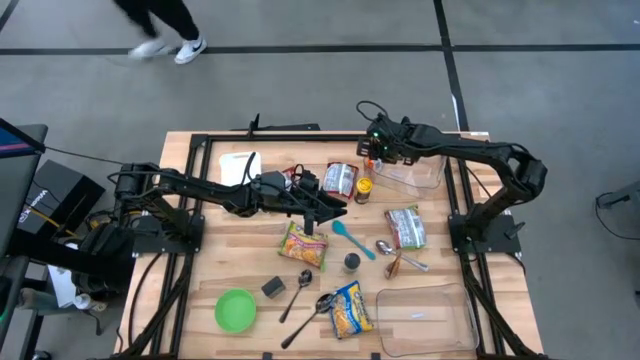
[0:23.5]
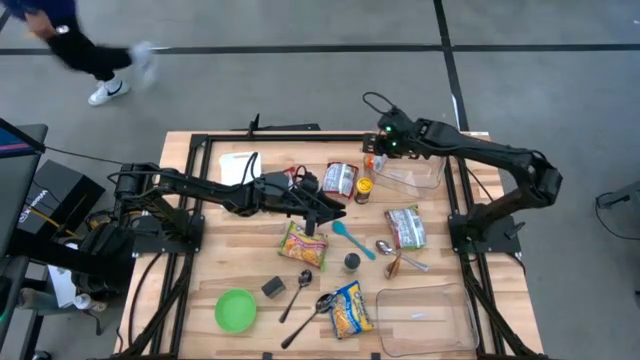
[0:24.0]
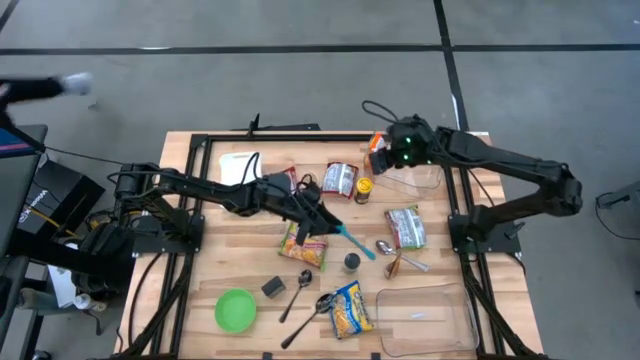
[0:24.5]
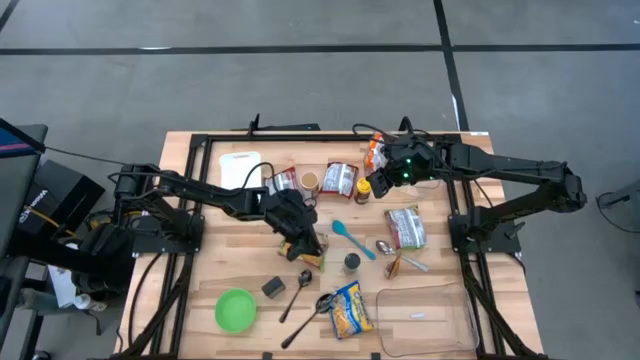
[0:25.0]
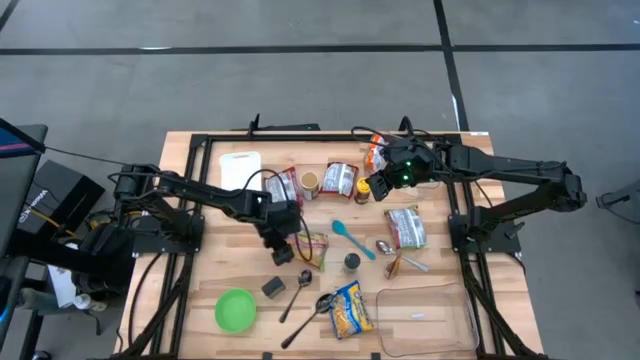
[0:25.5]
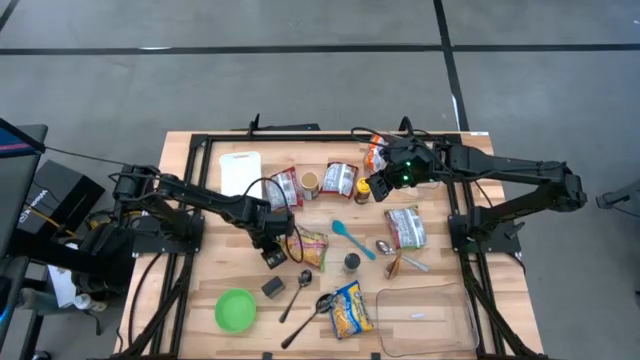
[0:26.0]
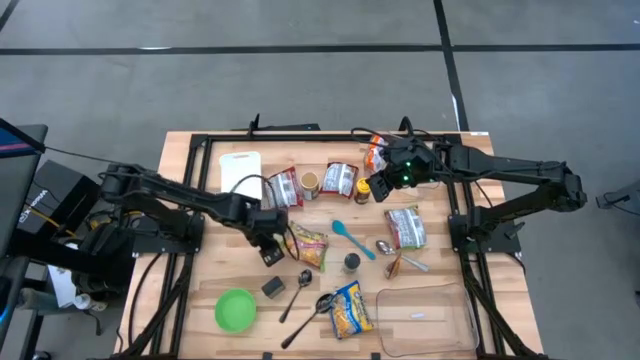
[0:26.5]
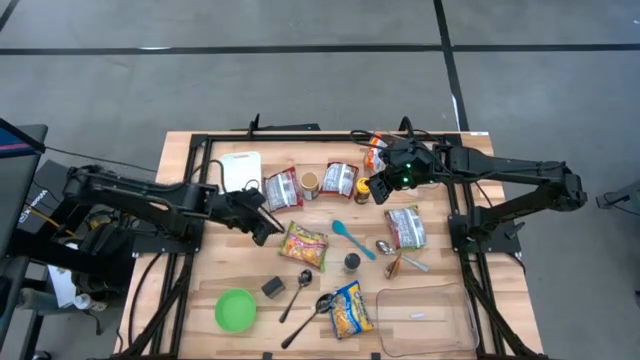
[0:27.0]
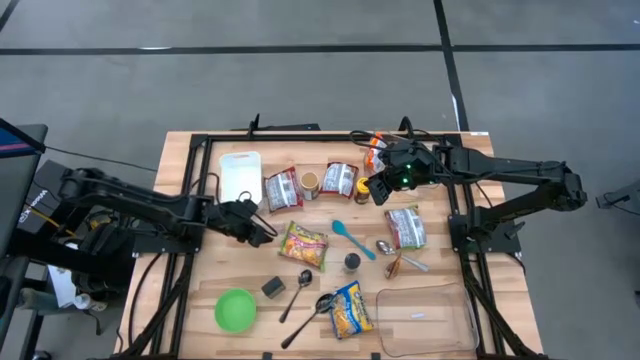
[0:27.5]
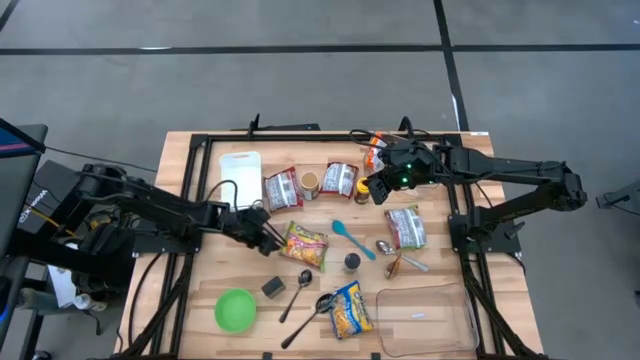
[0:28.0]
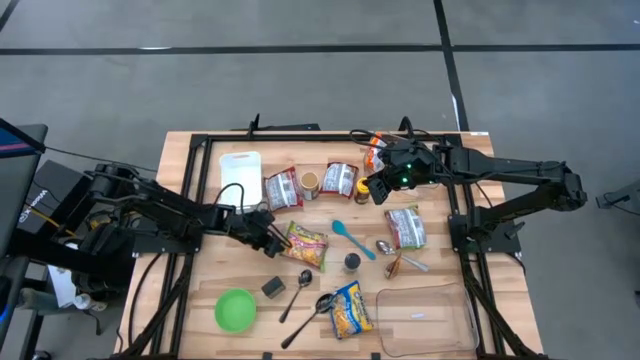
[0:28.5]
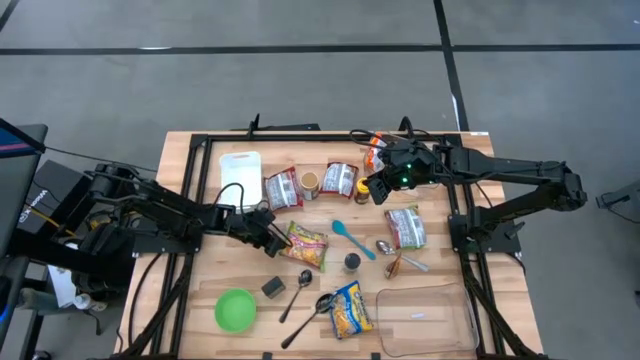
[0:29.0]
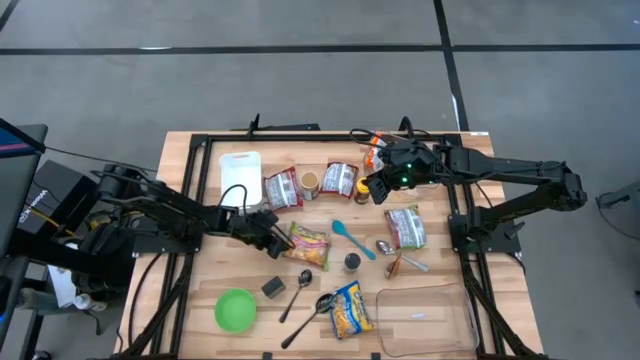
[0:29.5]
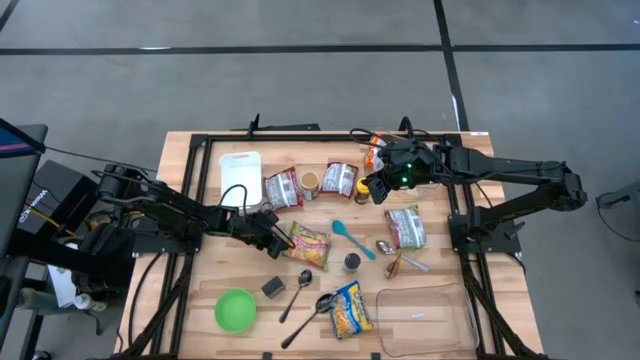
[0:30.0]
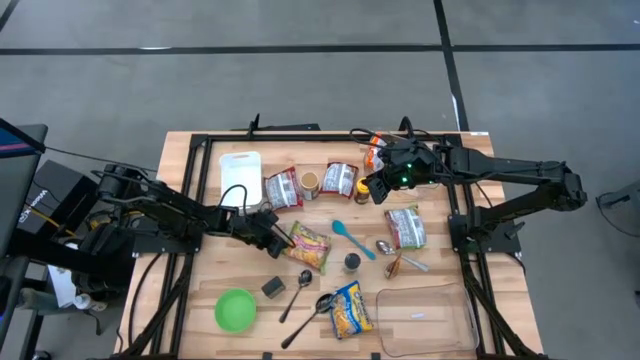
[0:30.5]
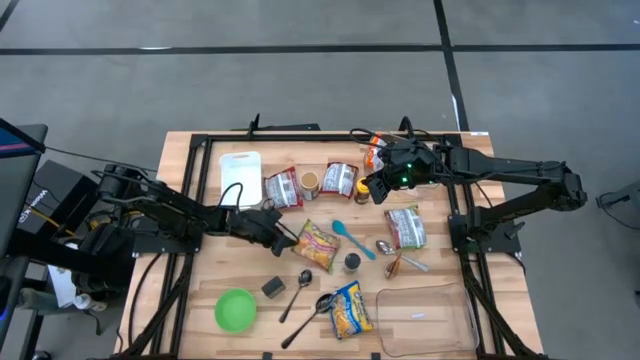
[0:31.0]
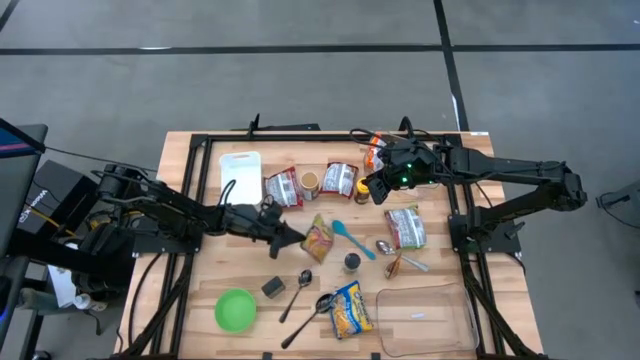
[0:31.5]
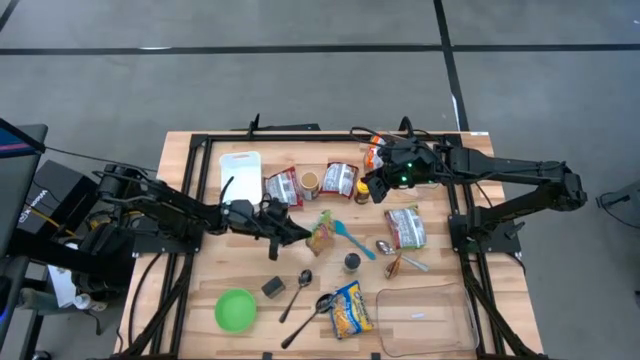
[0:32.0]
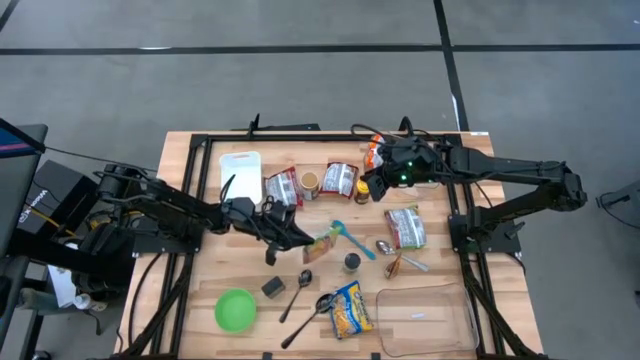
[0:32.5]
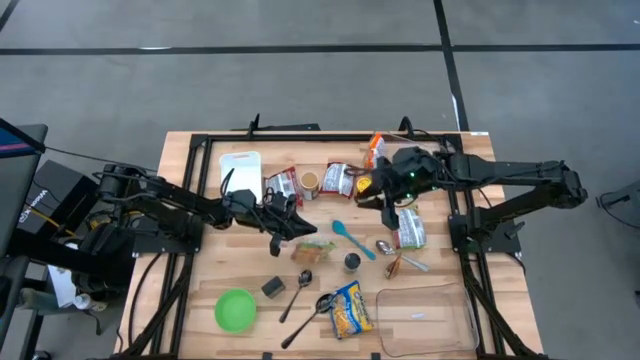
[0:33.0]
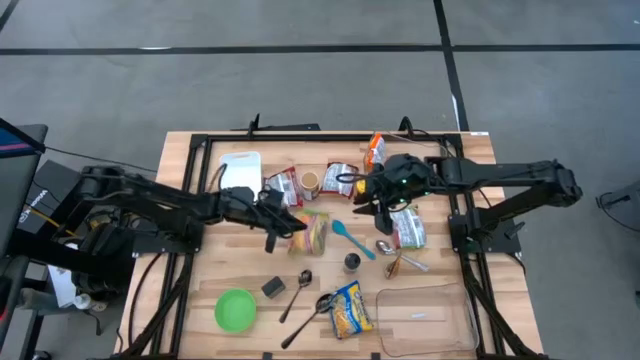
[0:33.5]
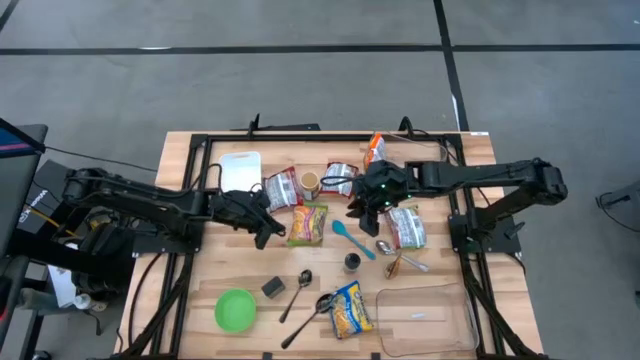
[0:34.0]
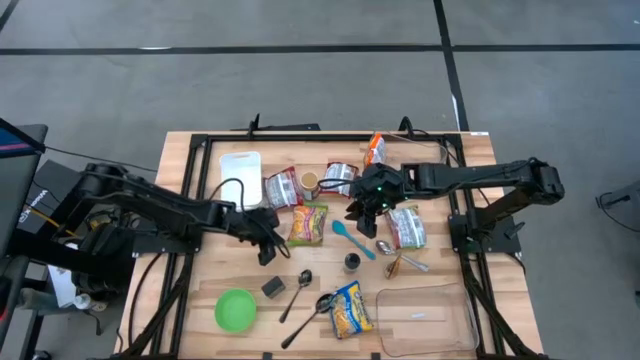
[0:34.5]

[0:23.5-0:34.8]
Task: Pick & Place Food Item
Put the left green noodle pack into the top transparent bin

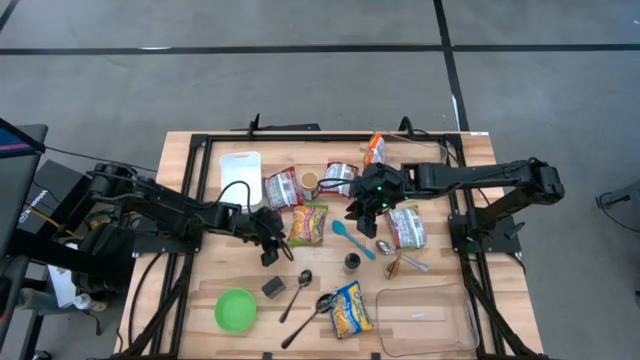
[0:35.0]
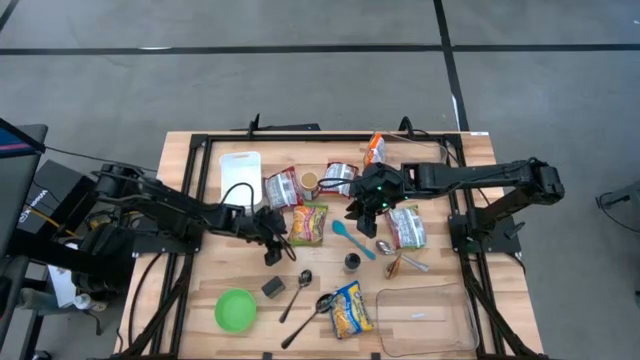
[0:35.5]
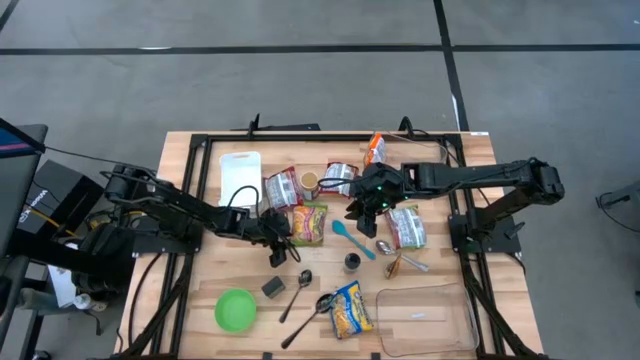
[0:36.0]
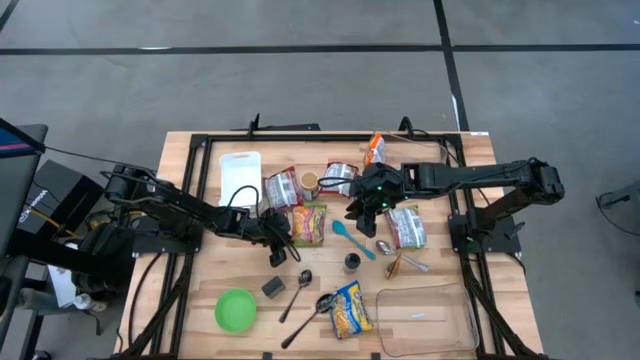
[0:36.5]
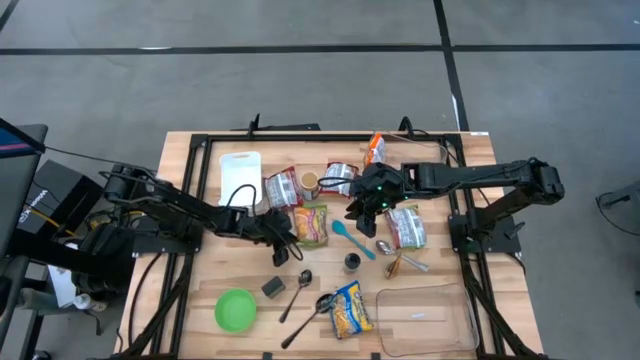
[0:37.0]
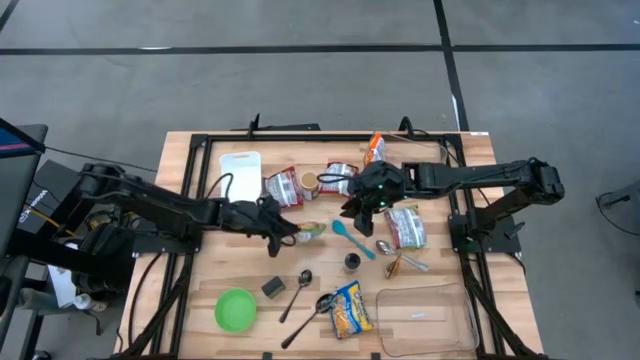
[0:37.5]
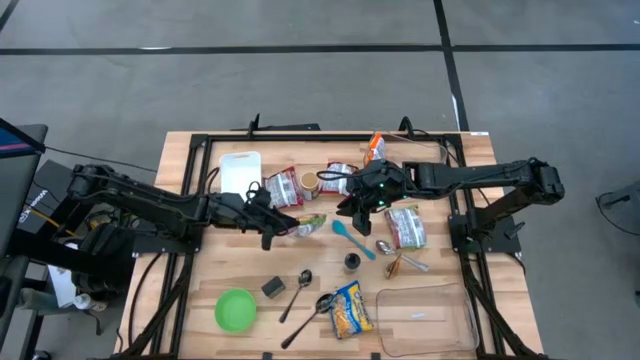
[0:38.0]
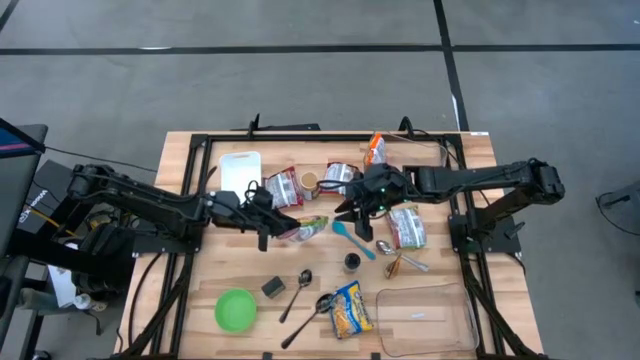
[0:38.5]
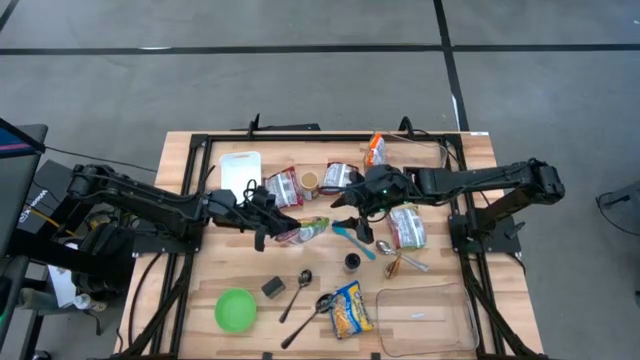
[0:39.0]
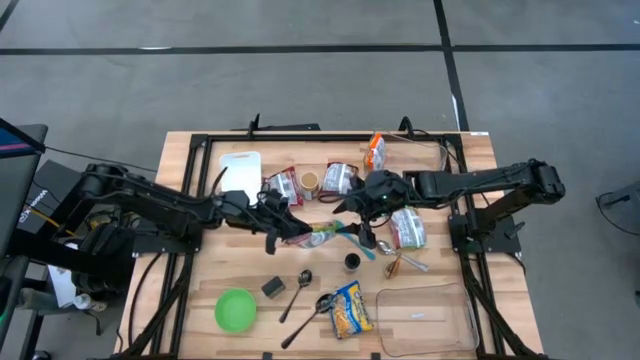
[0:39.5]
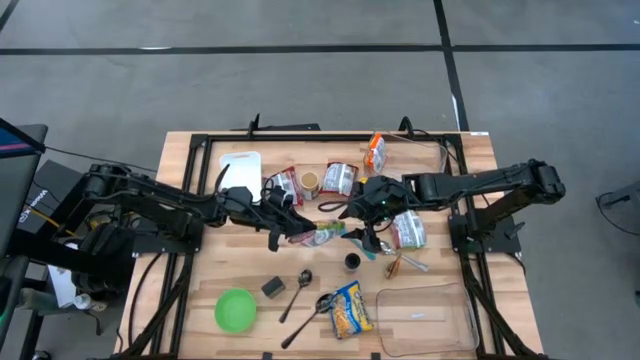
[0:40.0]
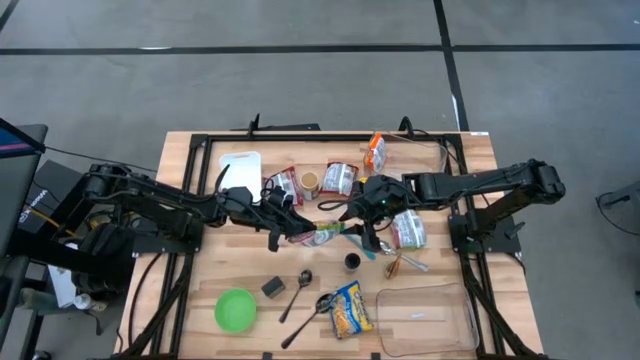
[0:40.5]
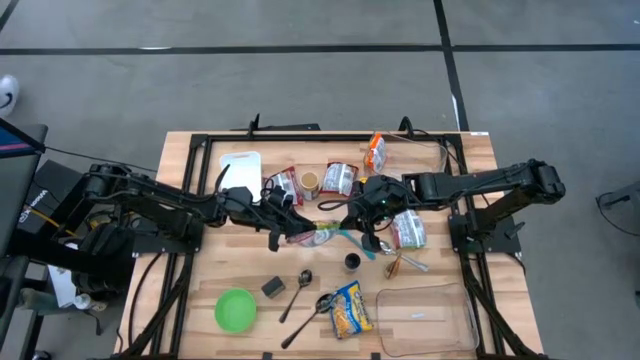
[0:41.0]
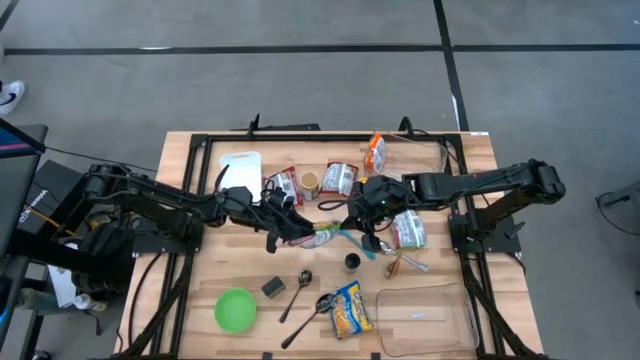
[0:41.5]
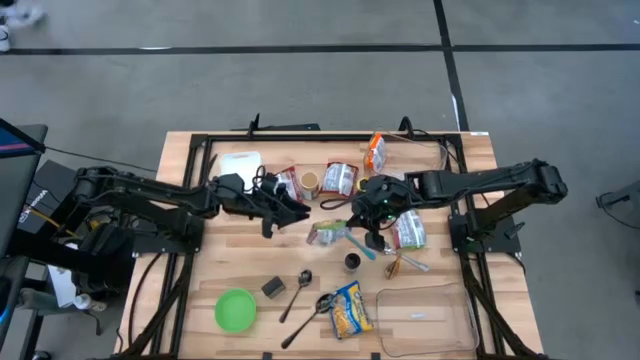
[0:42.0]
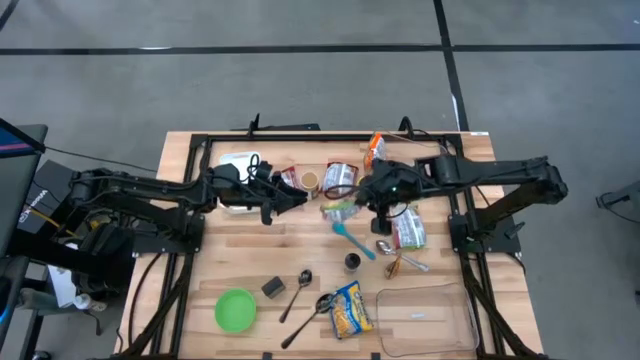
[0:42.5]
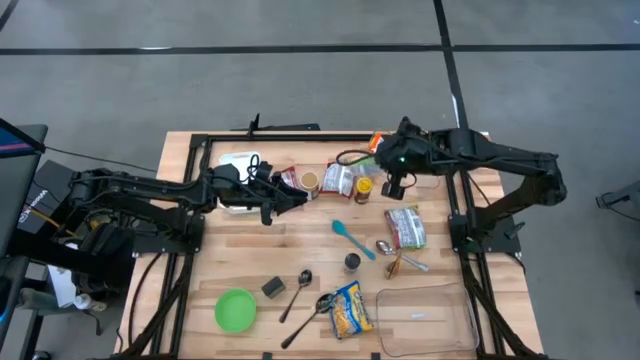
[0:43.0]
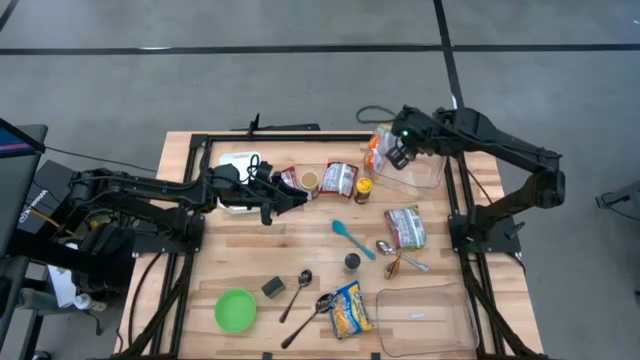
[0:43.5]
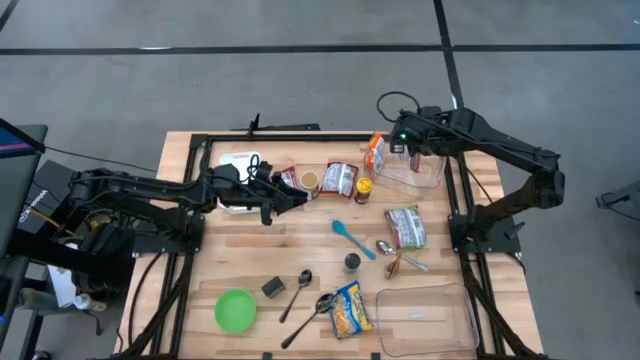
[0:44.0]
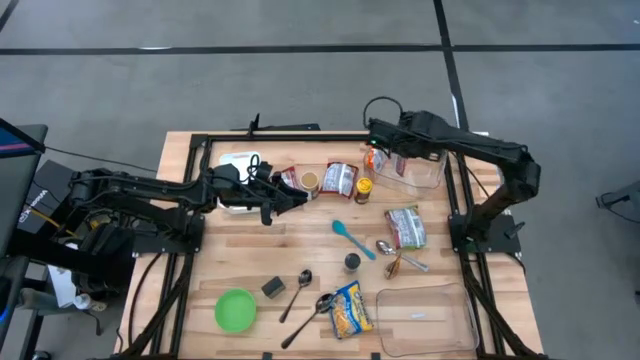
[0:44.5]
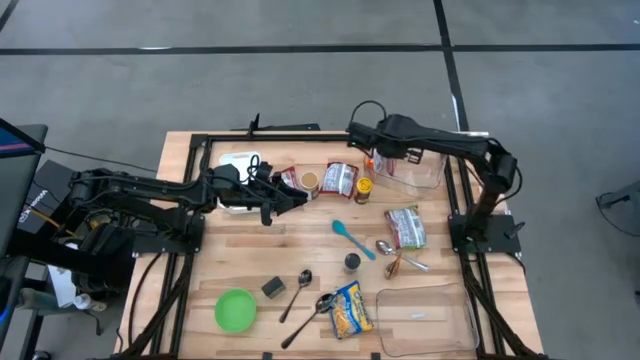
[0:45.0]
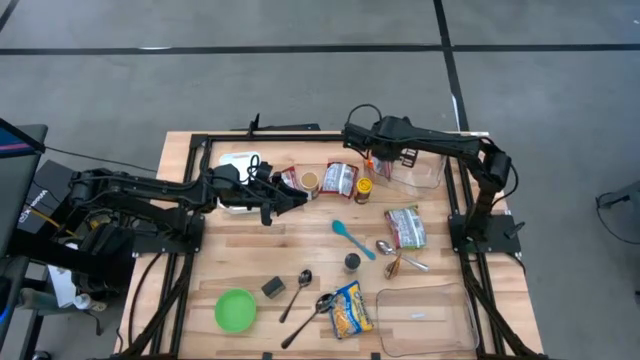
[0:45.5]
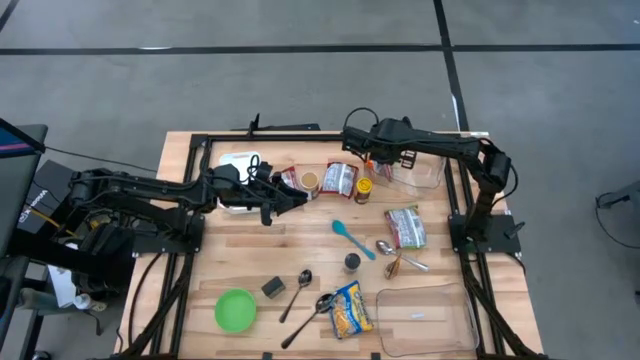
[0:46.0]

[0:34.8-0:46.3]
Put the left green noodle pack into the top transparent bin
